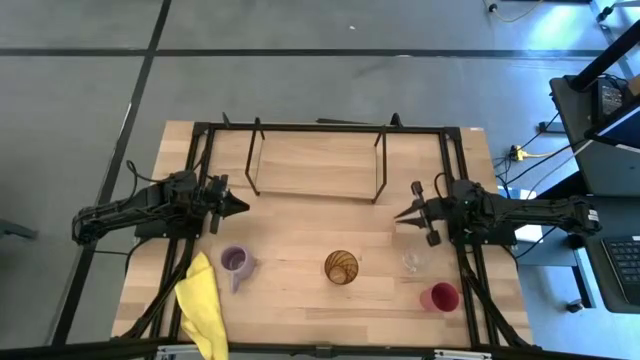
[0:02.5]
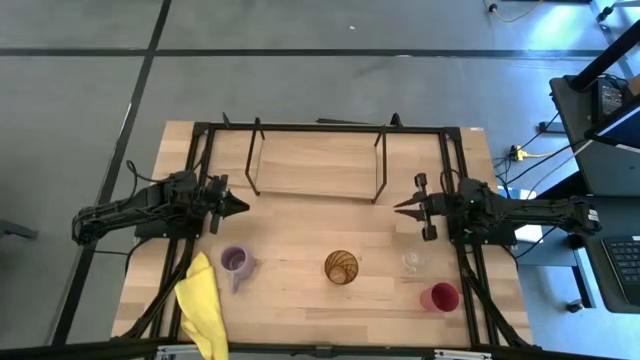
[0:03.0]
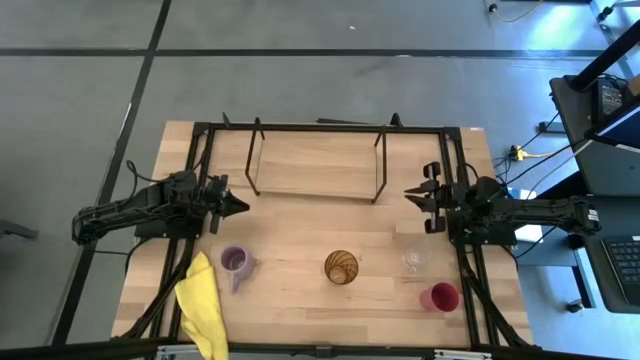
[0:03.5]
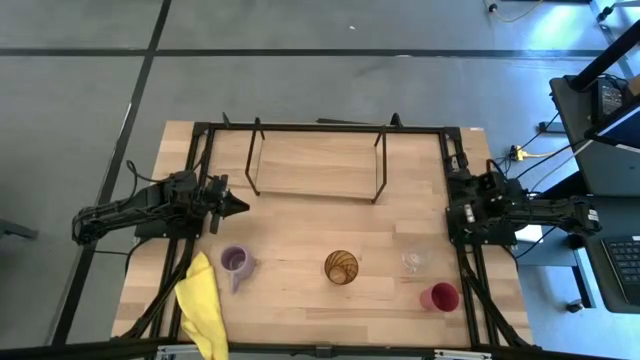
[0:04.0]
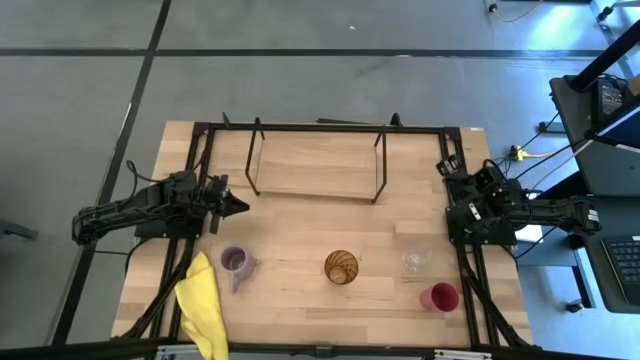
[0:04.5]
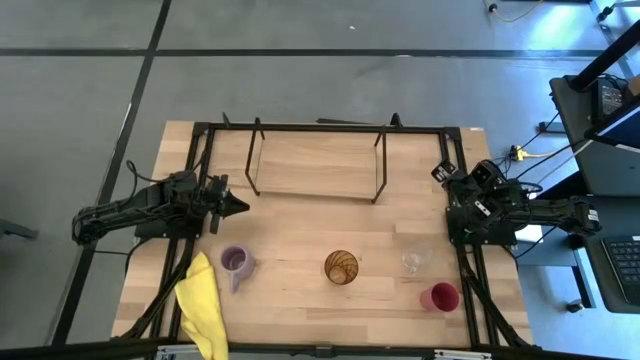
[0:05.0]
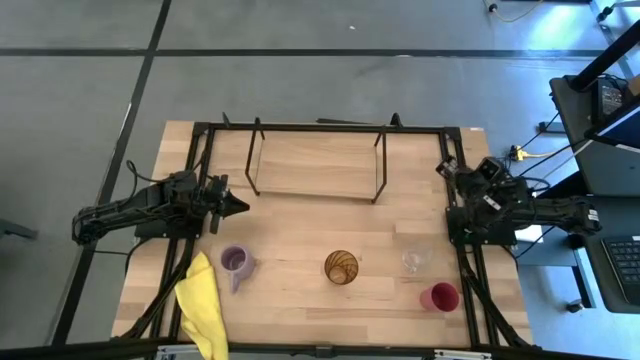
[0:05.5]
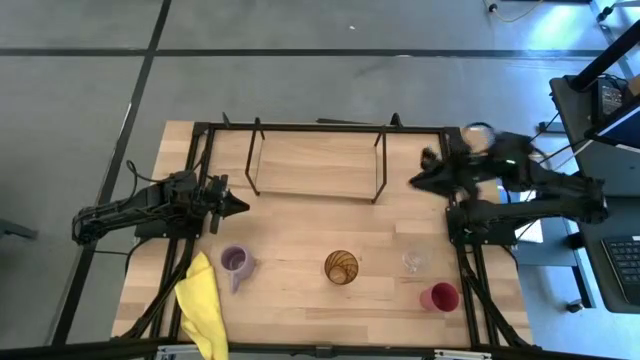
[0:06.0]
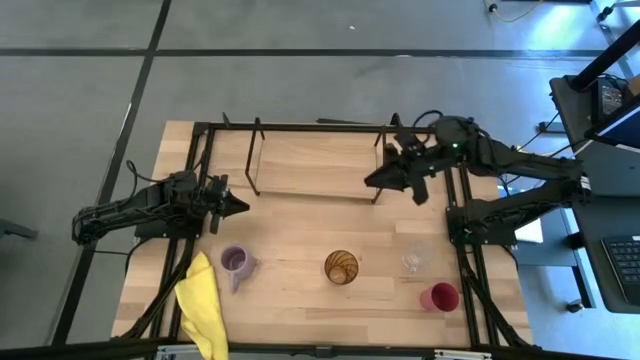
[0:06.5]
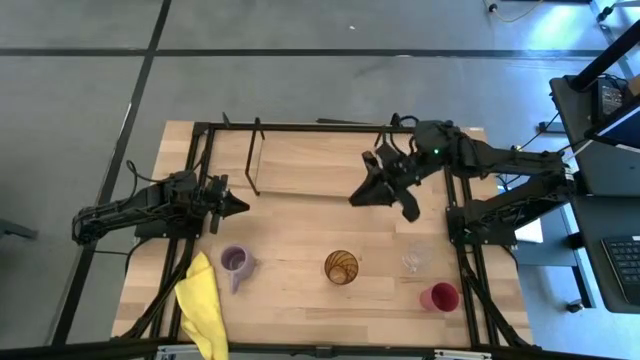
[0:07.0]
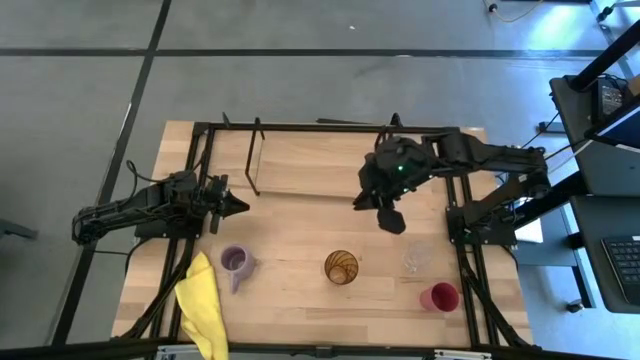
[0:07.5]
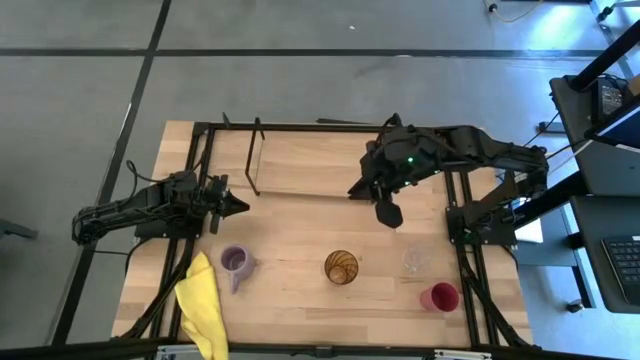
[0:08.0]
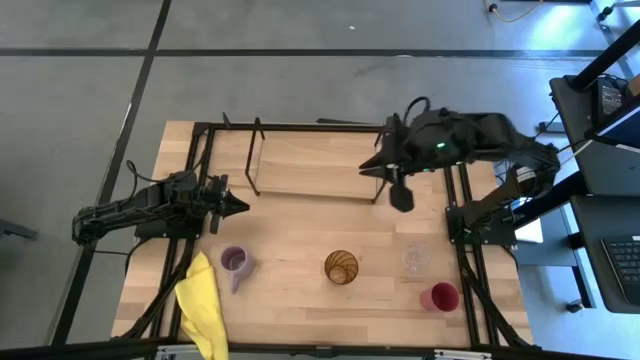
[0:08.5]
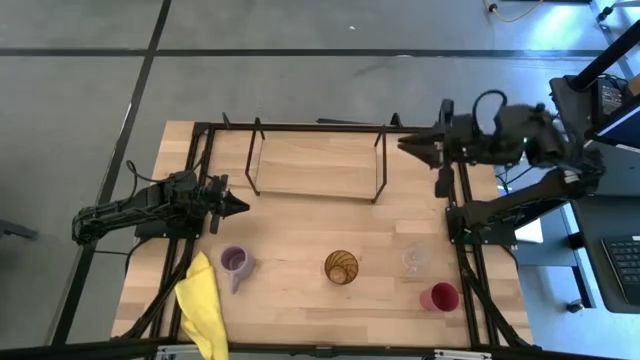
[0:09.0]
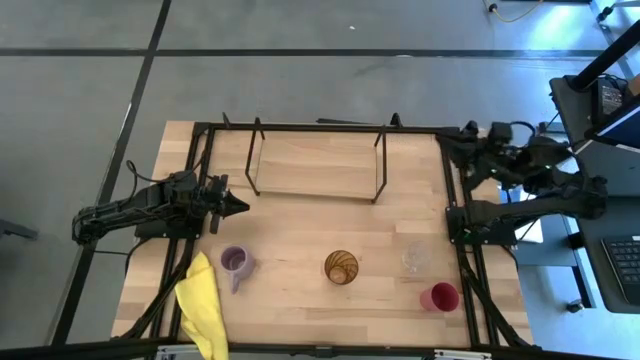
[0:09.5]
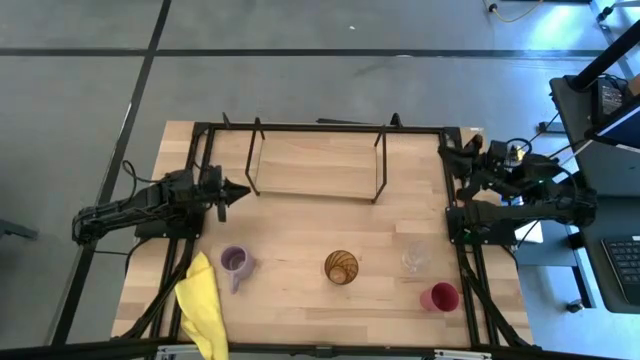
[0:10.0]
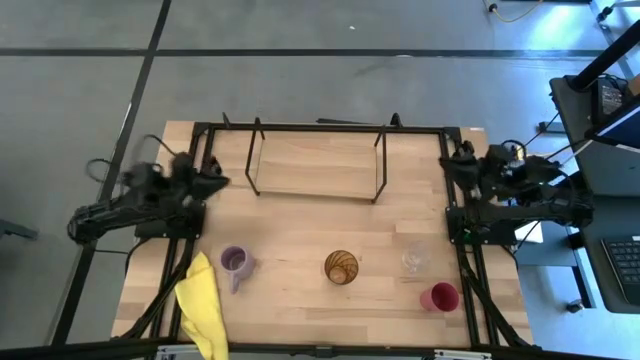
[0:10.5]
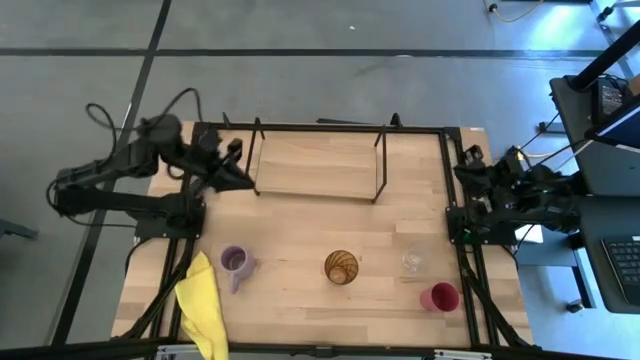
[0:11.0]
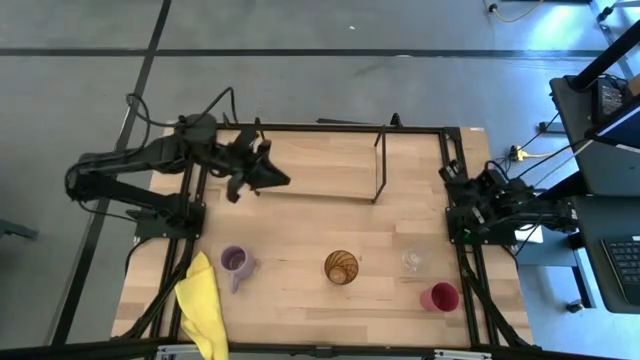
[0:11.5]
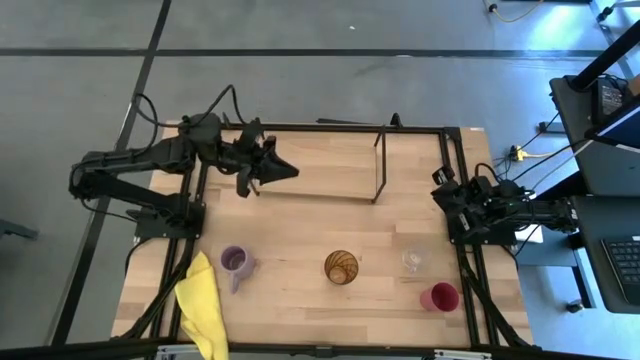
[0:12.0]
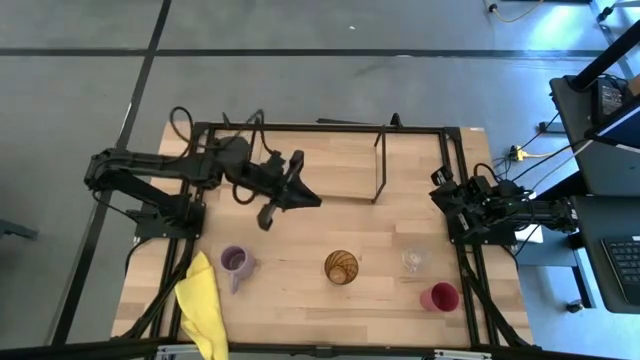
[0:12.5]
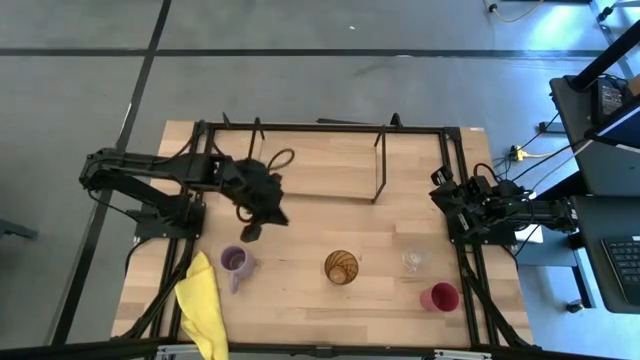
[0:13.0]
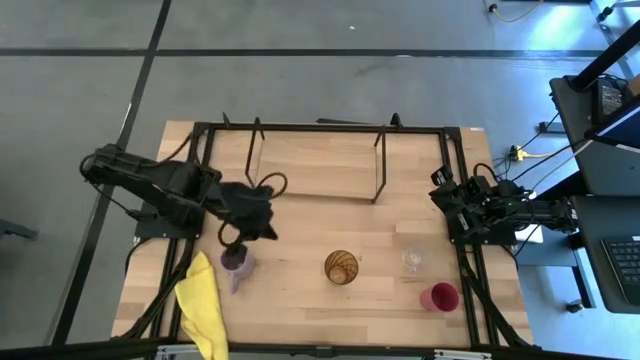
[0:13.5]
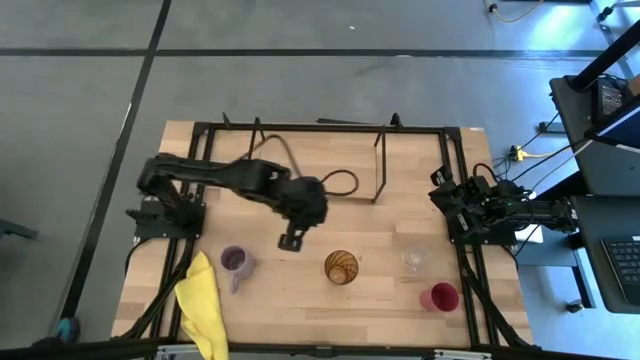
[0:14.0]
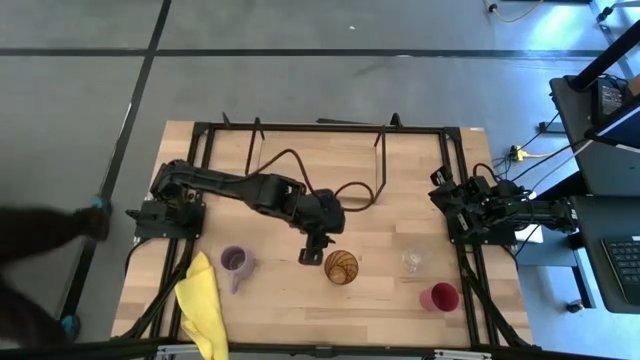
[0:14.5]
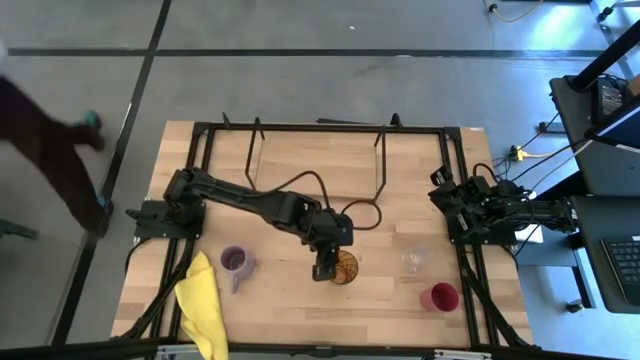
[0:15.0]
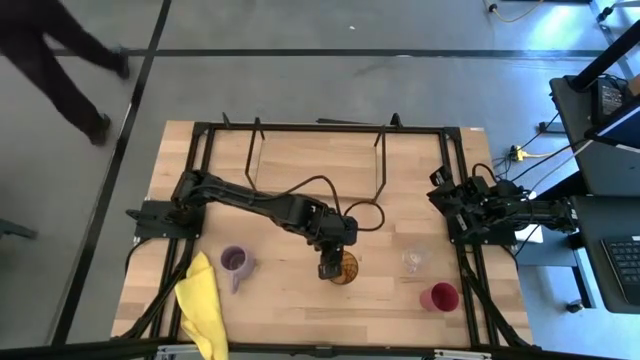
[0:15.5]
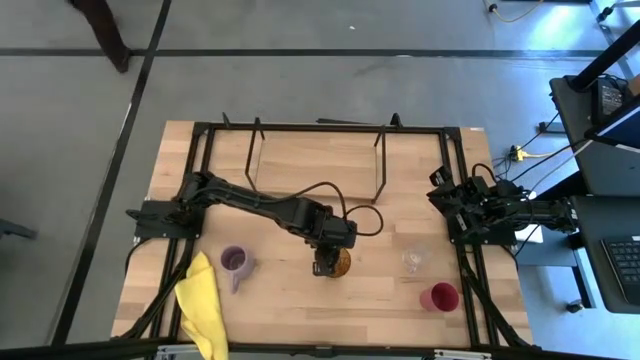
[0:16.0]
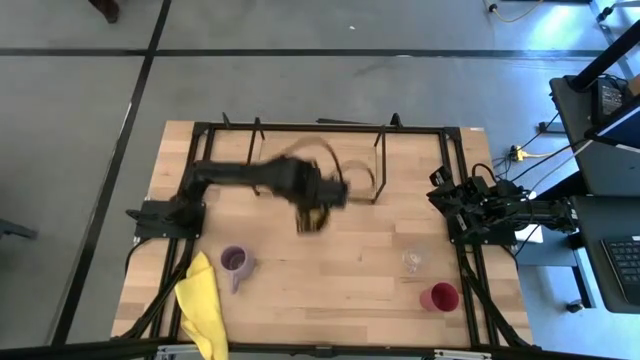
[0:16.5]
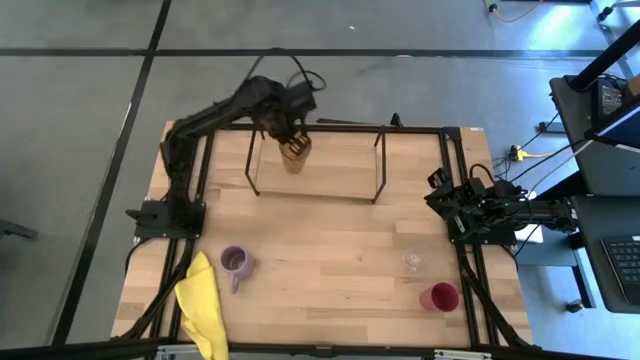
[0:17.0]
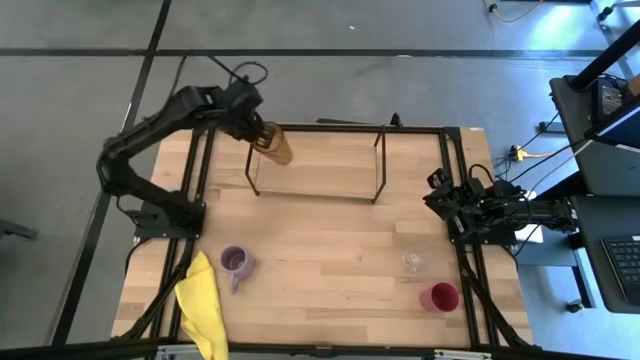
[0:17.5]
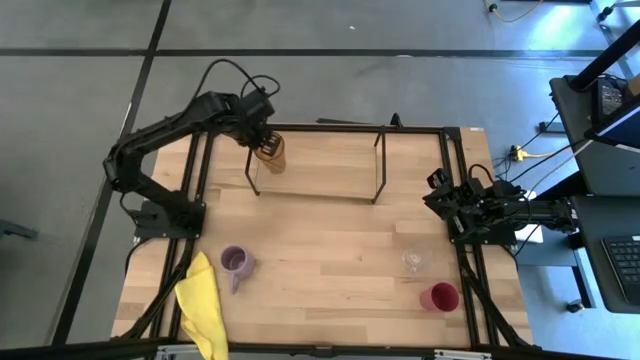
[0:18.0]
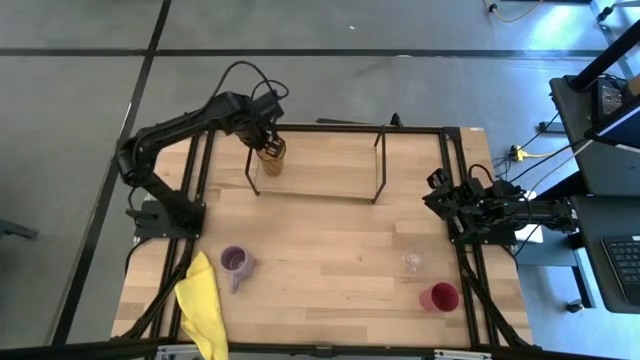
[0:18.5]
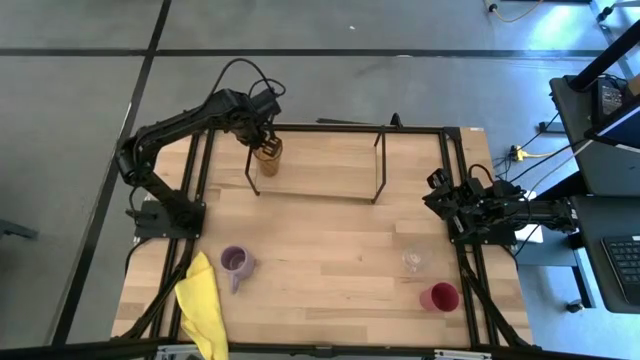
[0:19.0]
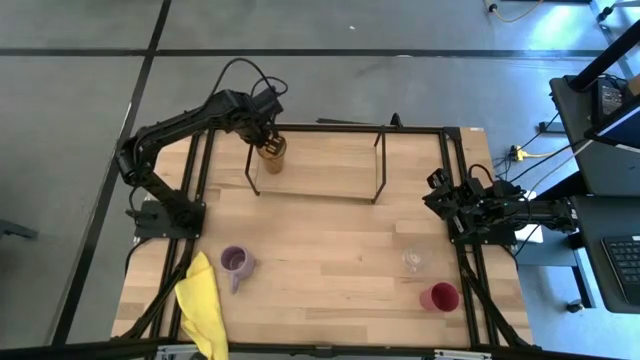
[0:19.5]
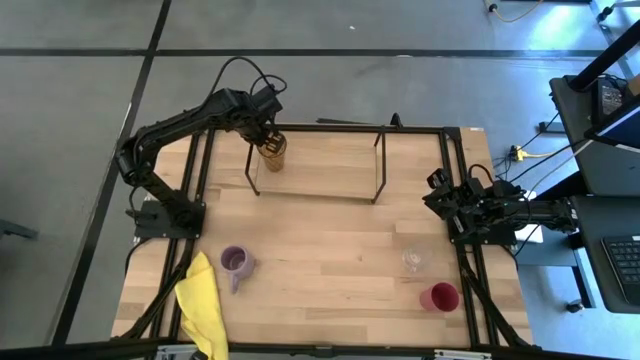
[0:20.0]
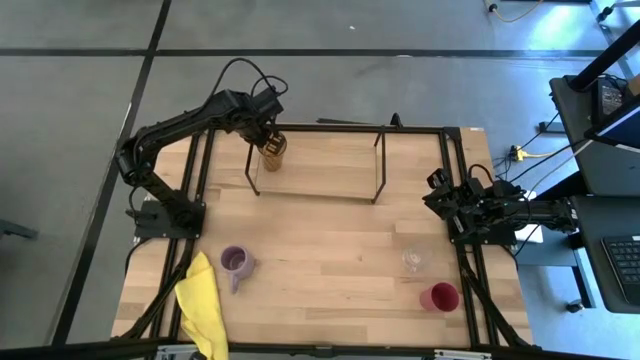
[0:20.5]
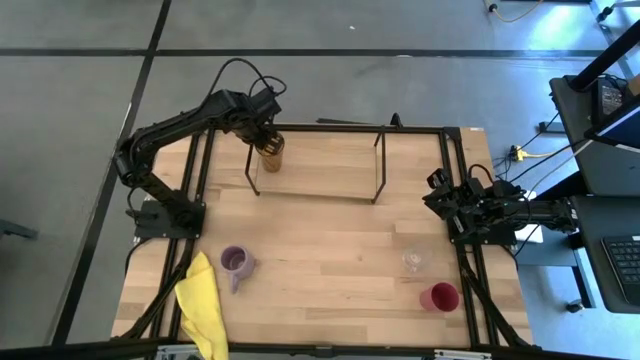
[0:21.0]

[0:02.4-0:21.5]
Task: Stack small to large cups/mugs on shelf
Put the brown cup on the shelf
